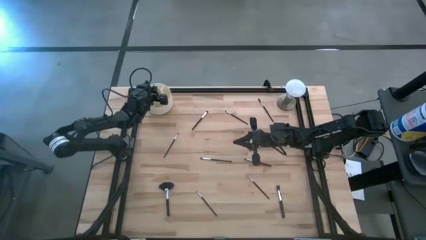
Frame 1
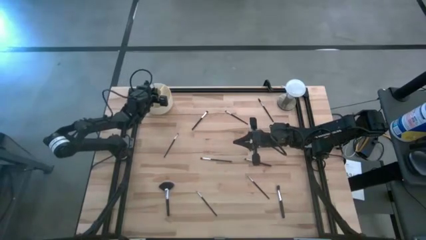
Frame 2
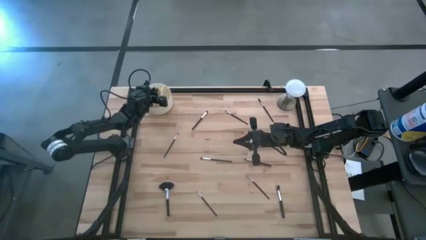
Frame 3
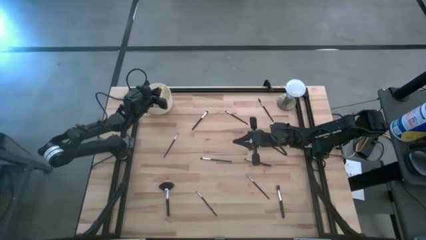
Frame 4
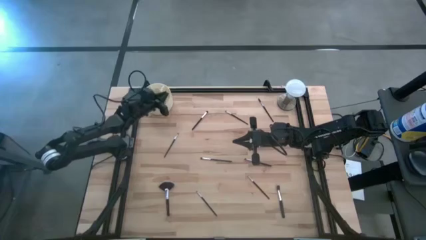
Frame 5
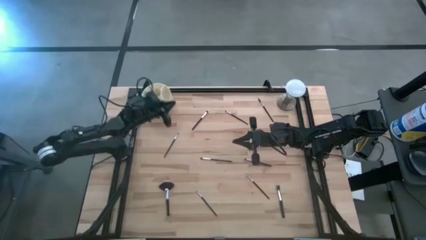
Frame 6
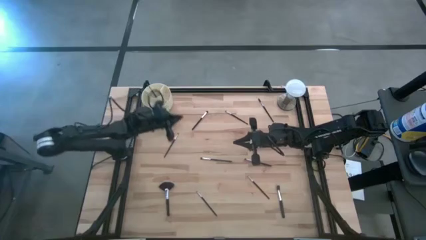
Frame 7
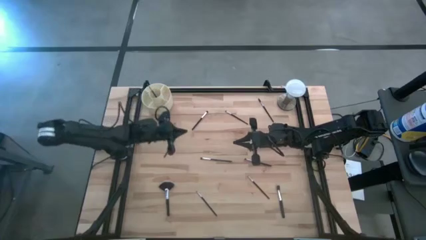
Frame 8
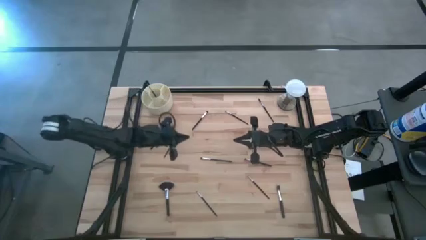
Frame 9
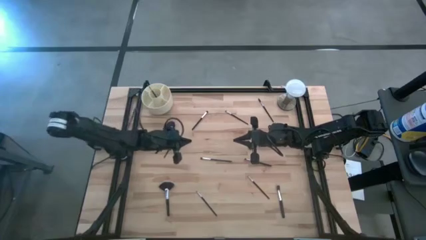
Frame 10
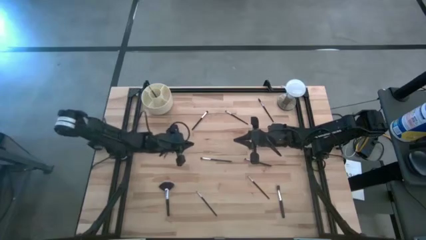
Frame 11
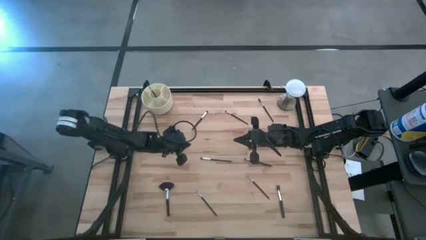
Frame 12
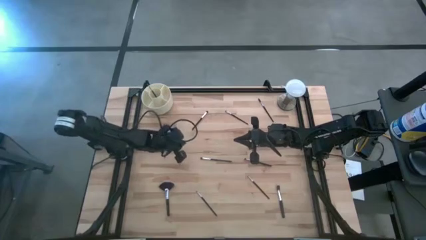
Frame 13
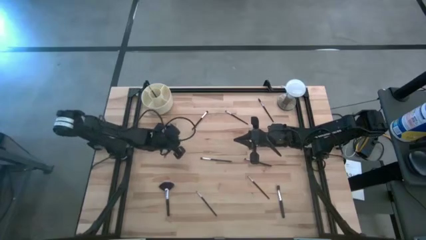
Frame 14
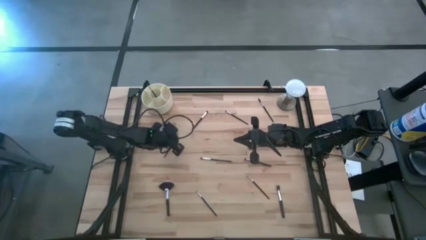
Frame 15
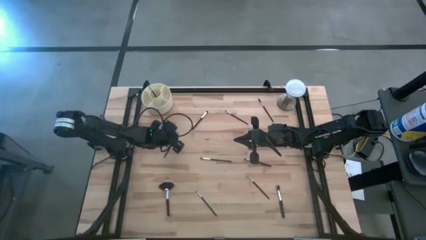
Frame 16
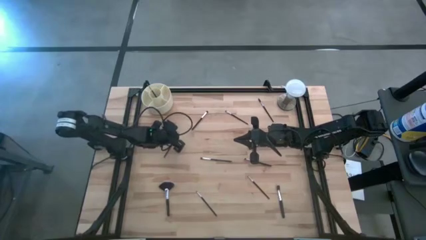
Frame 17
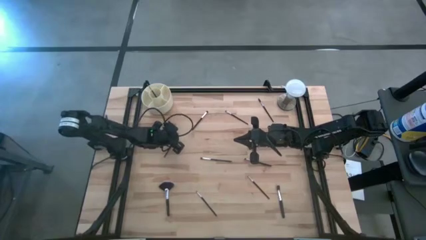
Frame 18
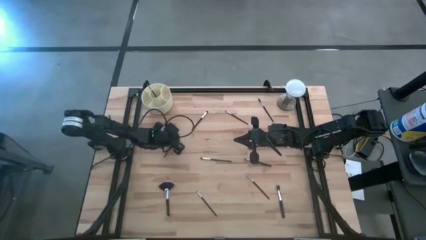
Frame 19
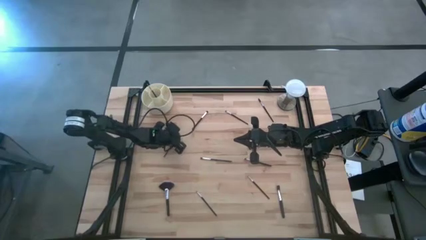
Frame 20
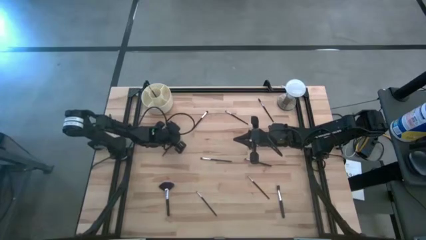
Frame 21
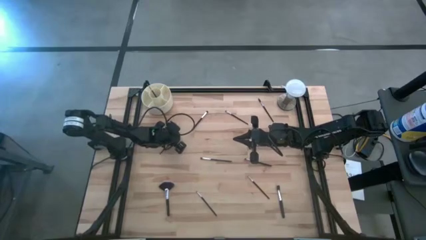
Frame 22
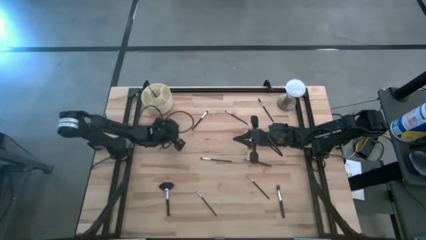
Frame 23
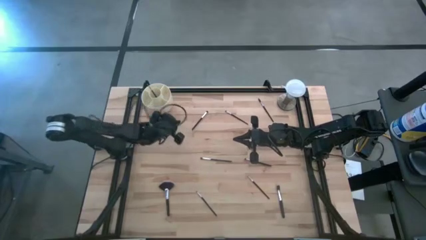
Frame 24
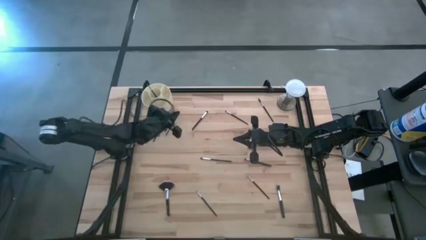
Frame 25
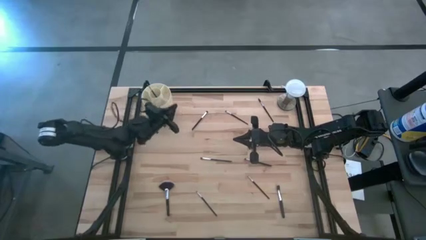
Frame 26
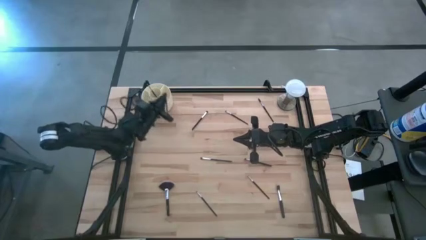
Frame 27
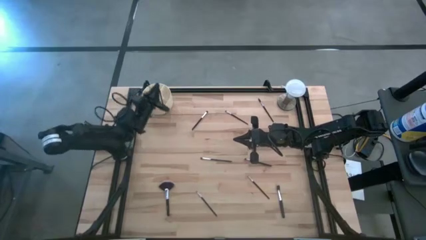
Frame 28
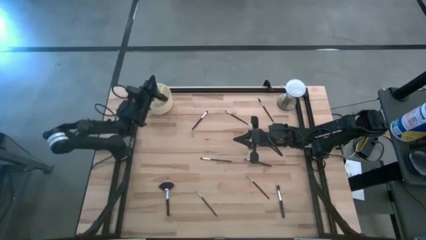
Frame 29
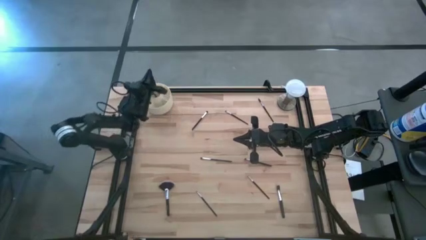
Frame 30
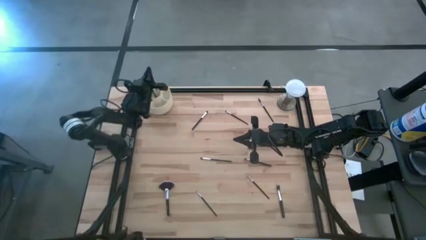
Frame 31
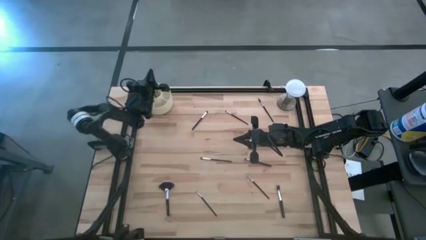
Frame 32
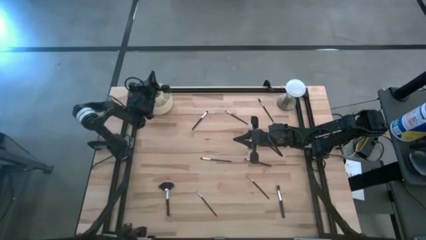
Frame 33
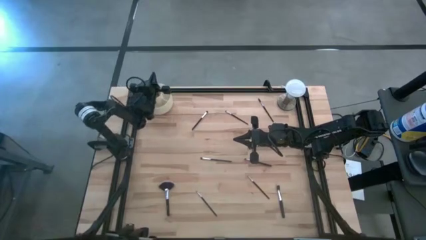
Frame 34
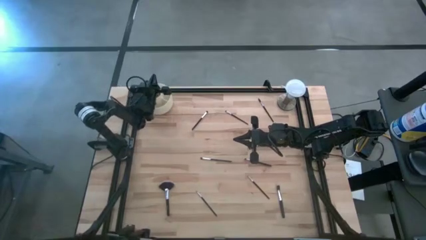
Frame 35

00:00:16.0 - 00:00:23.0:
Task: Put items in baskets/containers
Put the eyeshadow brush into the organizer

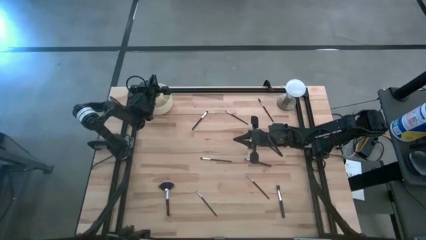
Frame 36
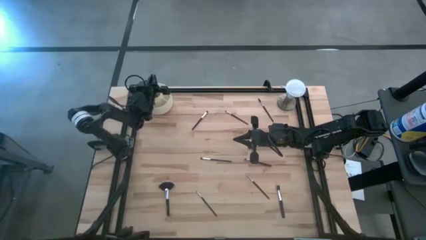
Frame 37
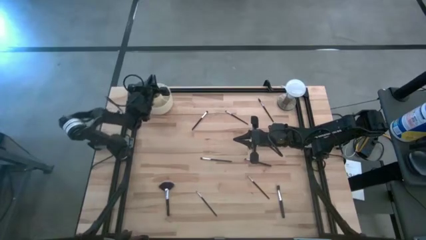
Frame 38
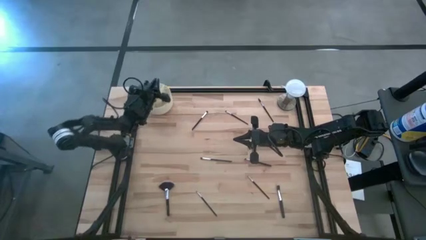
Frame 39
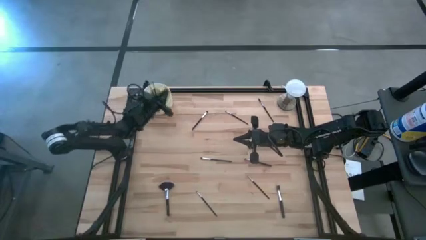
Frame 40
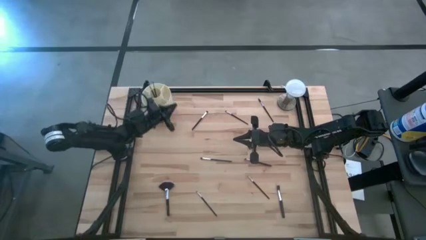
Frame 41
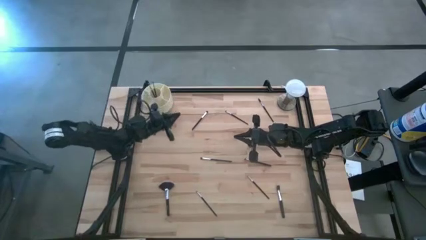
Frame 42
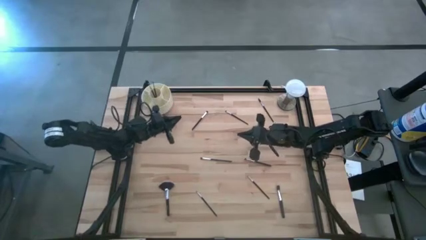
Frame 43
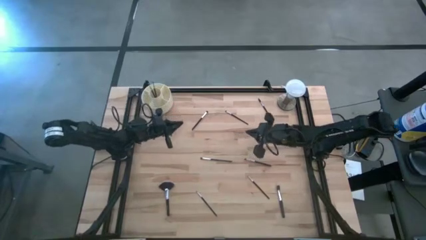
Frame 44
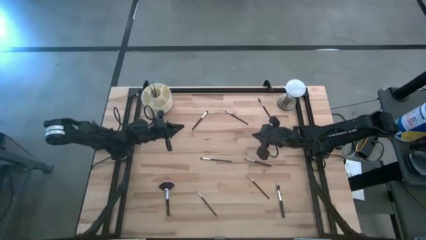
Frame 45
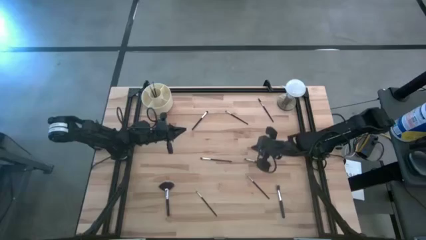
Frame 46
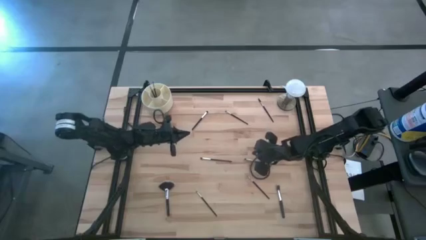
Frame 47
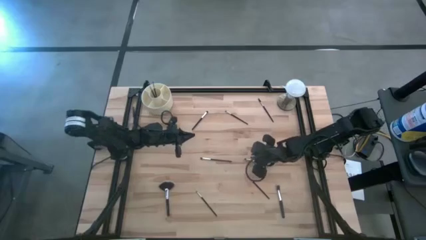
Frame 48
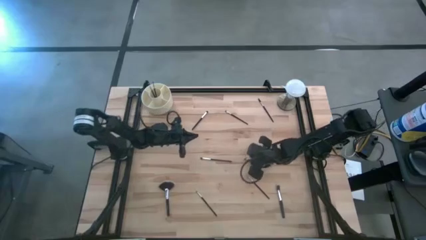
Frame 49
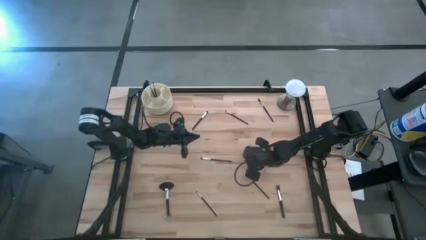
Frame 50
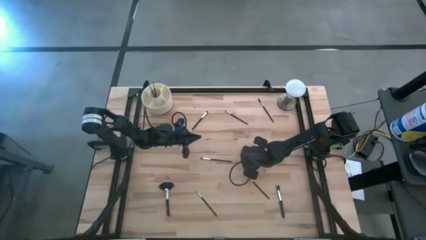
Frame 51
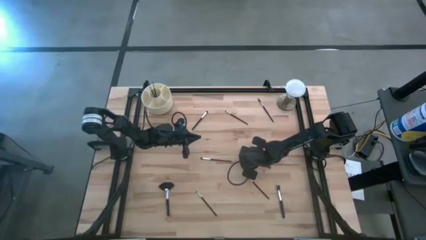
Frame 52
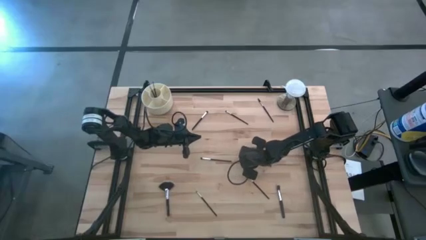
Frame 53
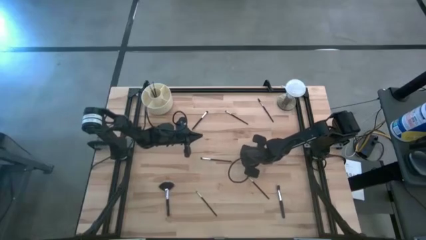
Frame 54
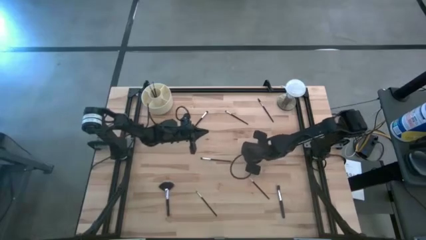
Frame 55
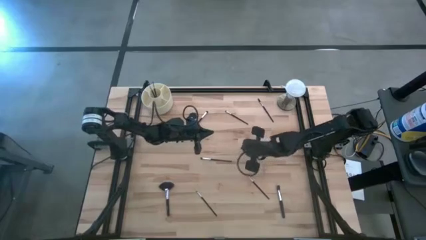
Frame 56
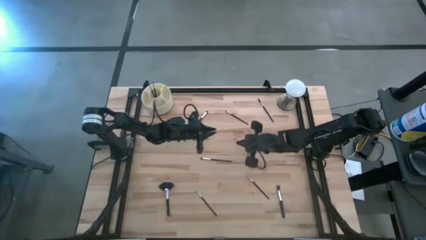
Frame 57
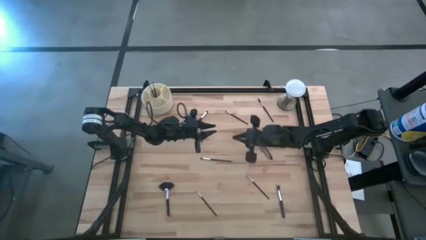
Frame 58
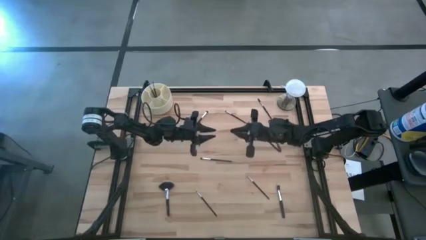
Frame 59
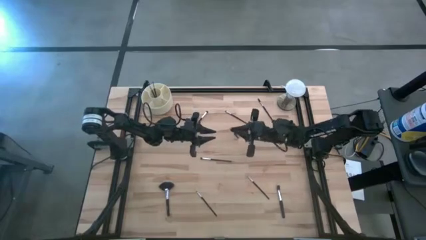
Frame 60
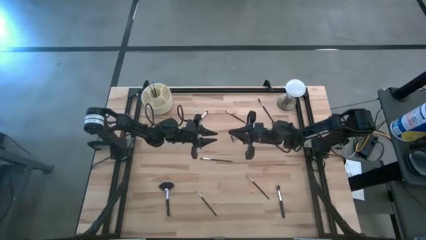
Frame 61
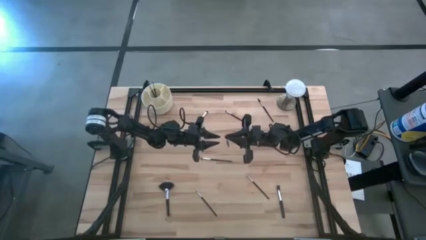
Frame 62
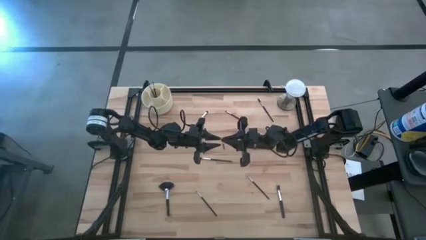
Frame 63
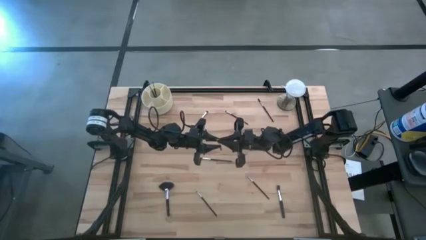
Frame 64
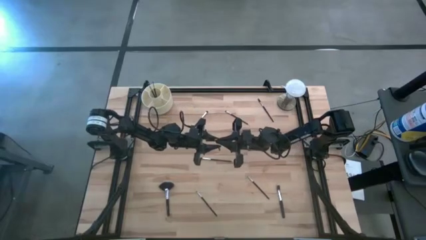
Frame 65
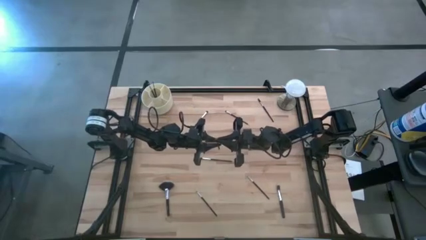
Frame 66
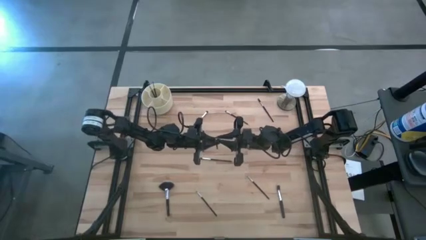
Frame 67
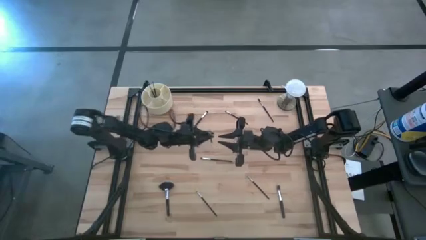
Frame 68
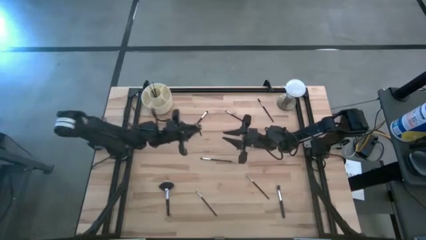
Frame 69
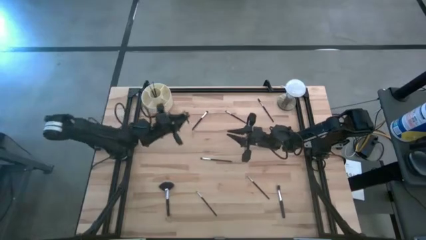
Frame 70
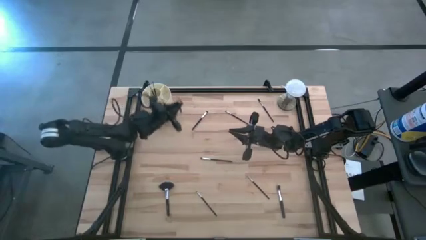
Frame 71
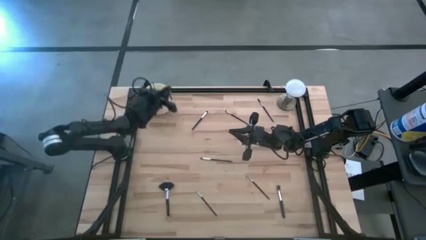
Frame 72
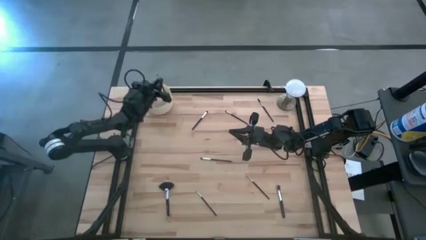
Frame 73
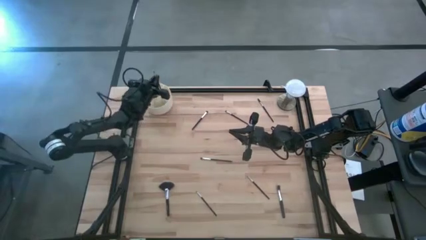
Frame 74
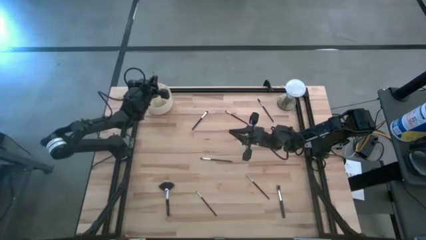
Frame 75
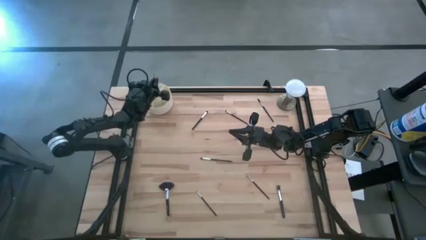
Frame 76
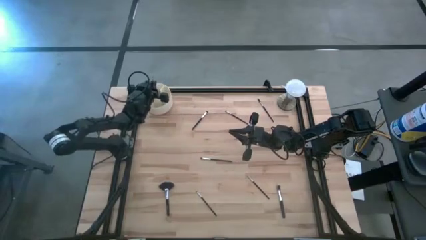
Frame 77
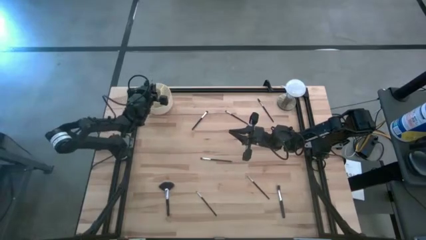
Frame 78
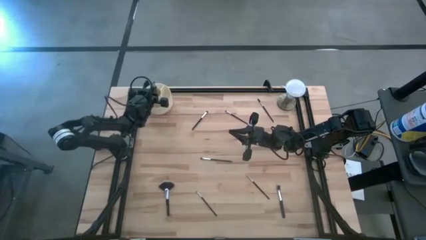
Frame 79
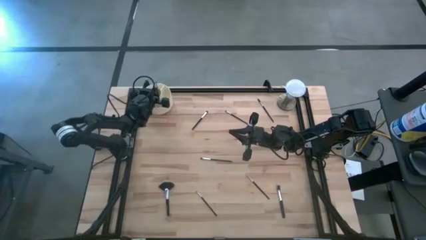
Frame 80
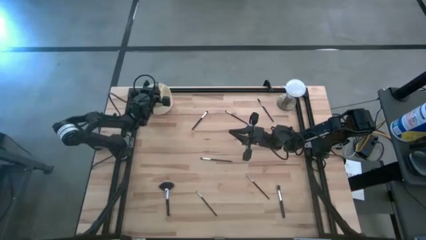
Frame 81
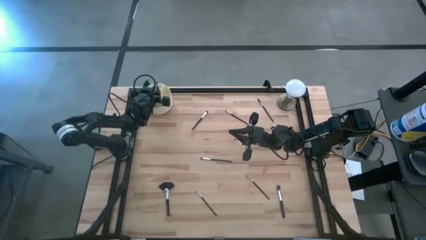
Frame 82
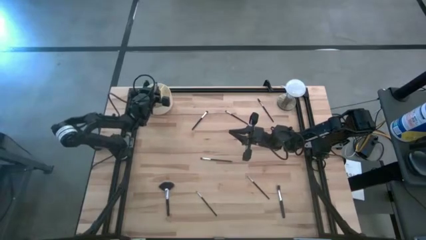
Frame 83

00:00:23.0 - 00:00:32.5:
Put the eyeshadow brush into the organizer
